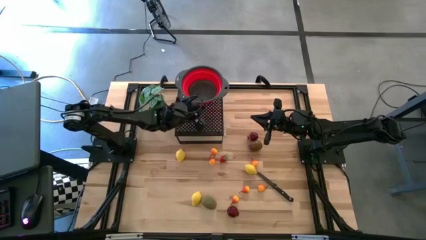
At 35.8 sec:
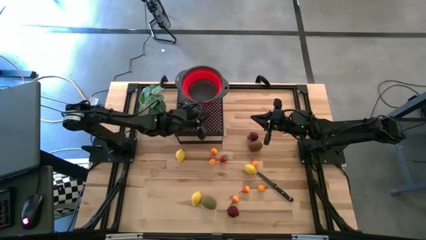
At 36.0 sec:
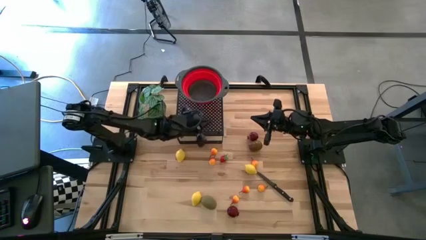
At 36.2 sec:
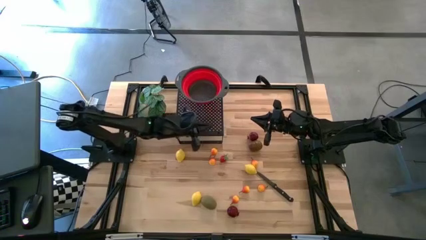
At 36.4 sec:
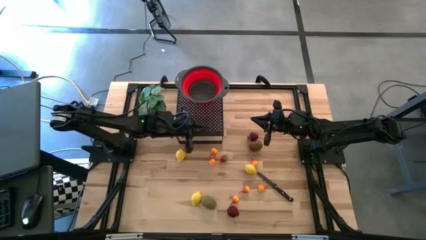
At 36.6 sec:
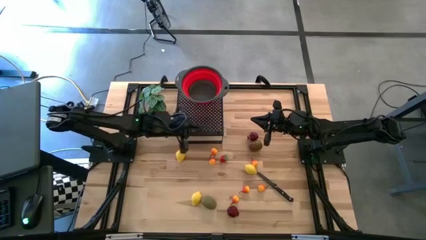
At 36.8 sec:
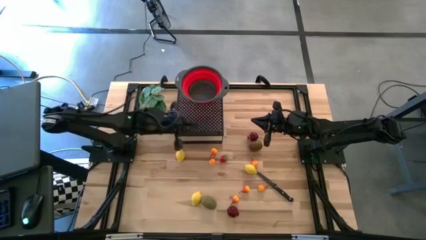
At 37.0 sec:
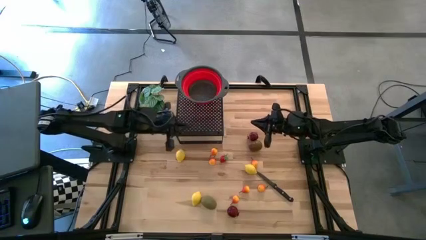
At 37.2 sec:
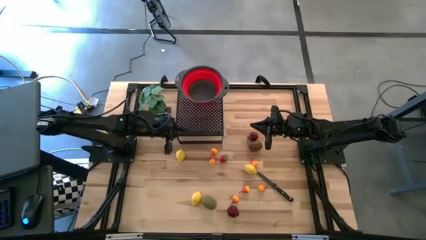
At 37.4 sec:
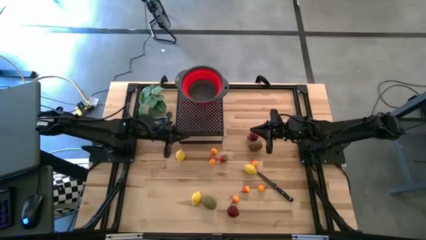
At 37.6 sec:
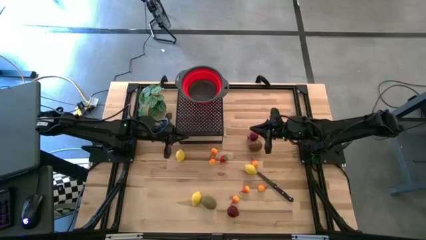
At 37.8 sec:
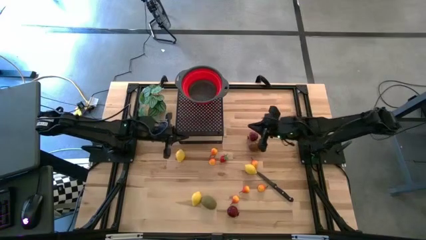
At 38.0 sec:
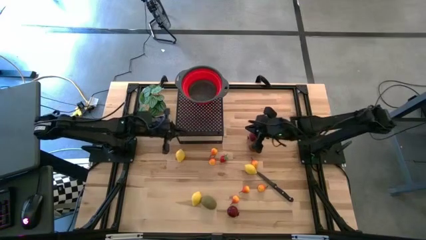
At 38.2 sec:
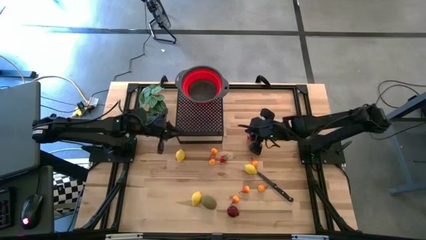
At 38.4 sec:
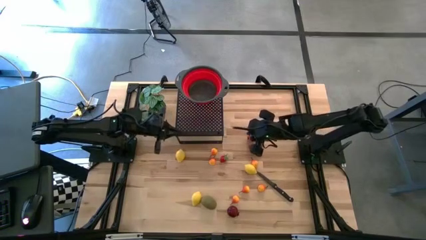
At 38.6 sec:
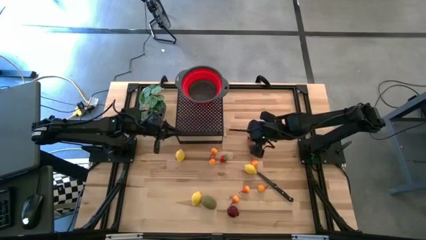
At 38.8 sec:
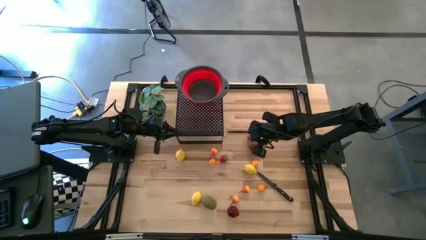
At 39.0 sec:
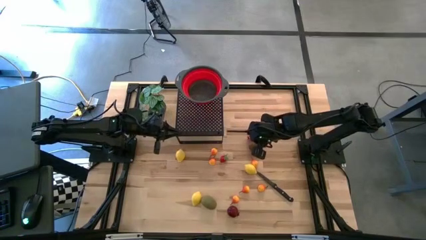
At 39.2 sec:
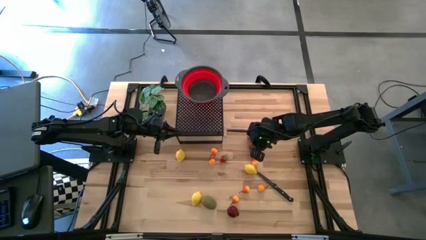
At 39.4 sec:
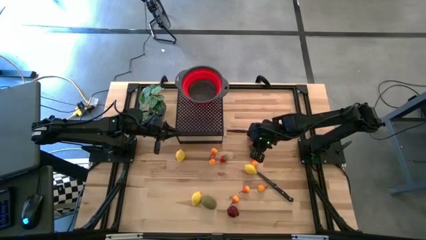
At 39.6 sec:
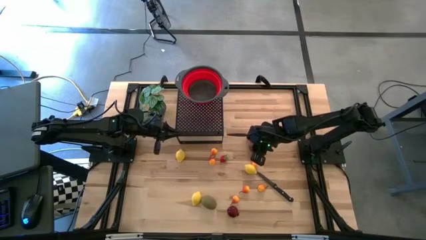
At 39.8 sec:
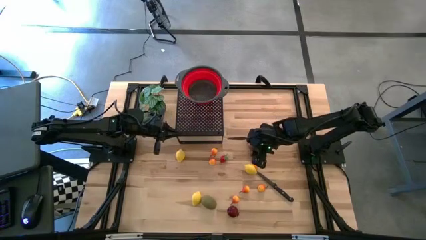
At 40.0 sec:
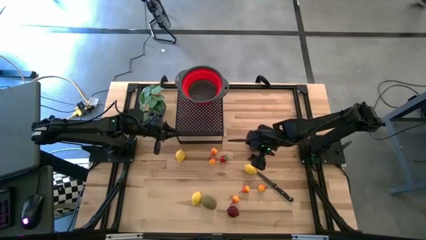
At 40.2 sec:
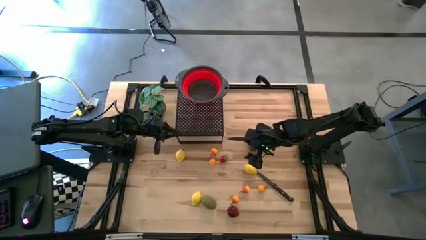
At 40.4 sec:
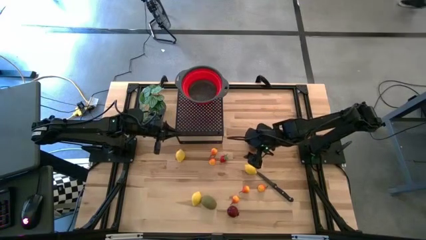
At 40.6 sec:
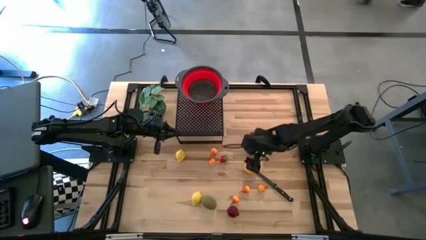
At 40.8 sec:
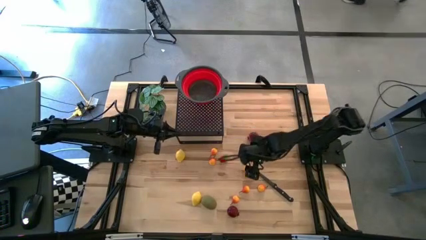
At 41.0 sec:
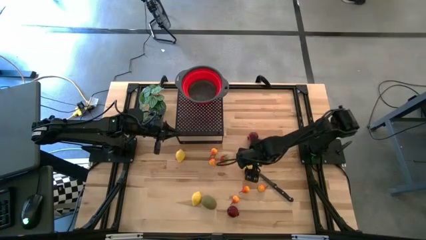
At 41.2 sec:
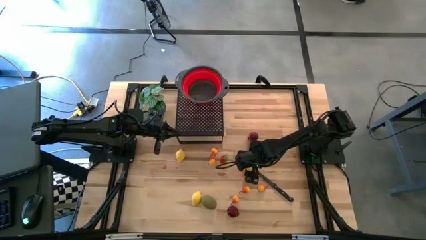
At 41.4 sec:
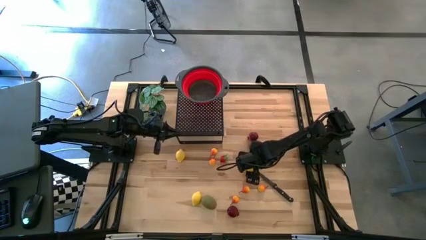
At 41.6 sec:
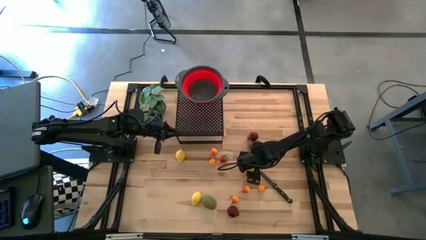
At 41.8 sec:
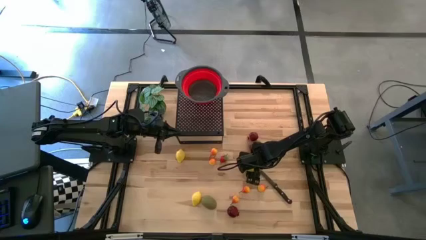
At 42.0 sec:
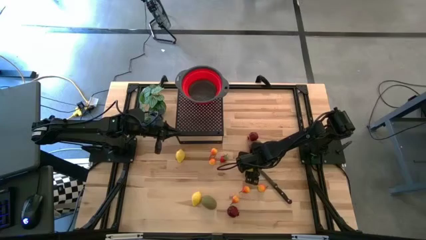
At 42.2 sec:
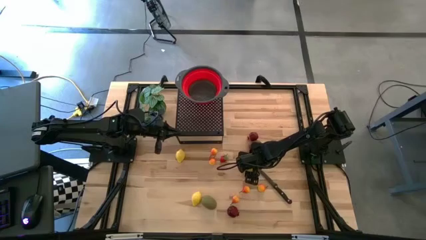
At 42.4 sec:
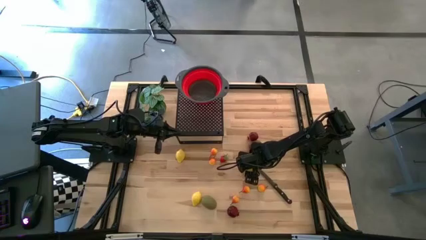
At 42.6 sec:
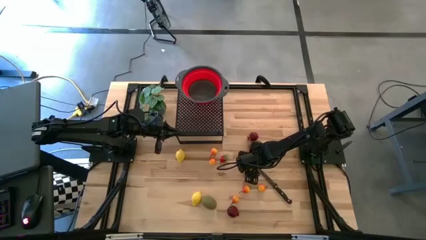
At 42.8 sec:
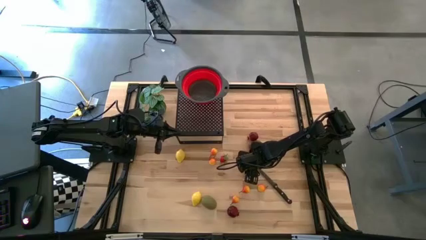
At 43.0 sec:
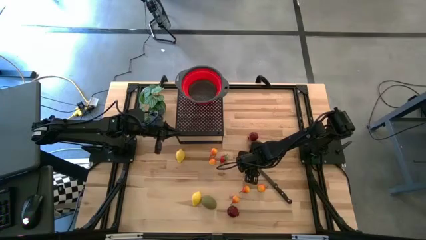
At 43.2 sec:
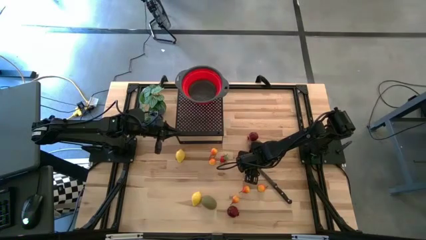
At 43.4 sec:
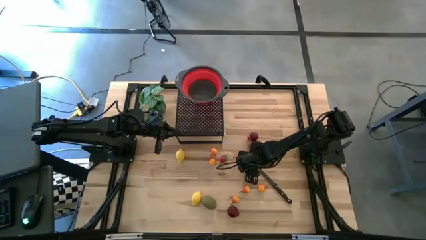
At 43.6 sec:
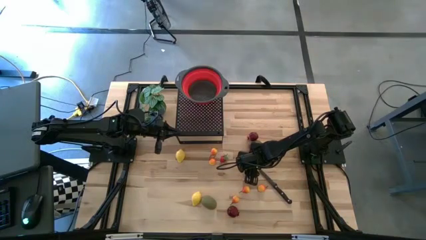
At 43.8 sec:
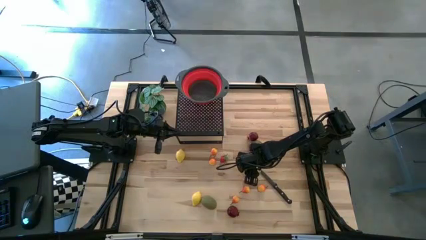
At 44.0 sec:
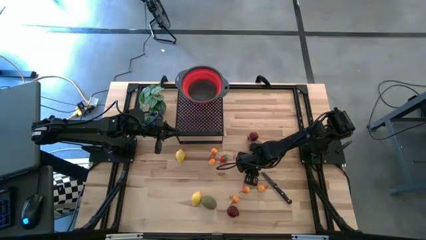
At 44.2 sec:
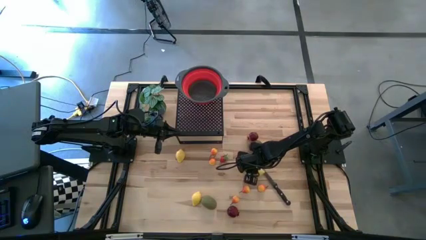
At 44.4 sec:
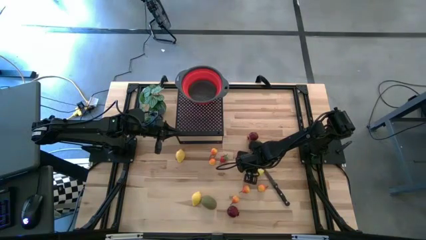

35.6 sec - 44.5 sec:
Task: Pick & Place Fruit
Put the right lemon into the red strainer bowl

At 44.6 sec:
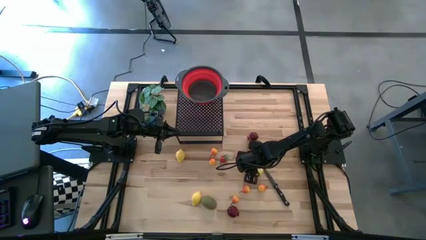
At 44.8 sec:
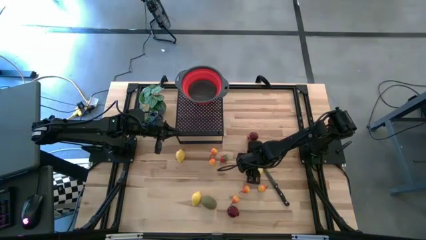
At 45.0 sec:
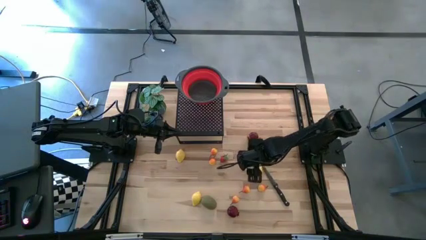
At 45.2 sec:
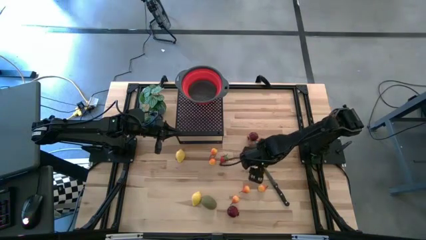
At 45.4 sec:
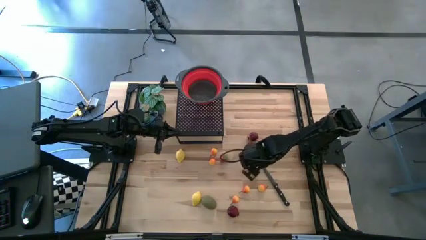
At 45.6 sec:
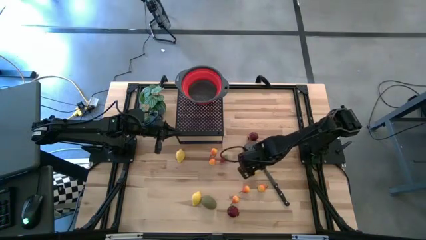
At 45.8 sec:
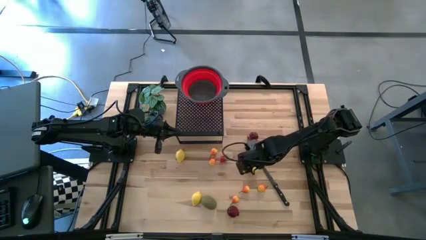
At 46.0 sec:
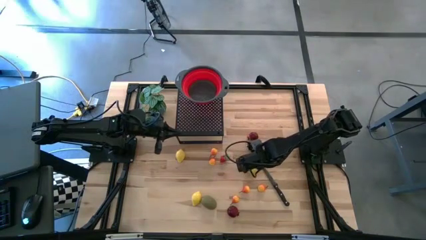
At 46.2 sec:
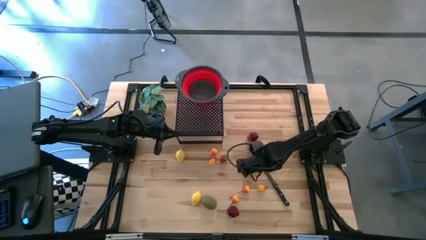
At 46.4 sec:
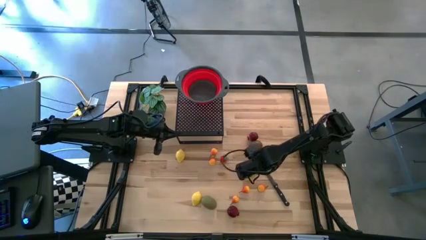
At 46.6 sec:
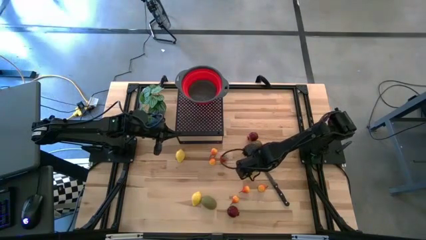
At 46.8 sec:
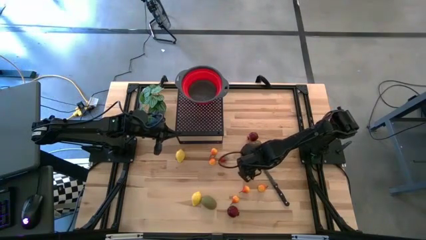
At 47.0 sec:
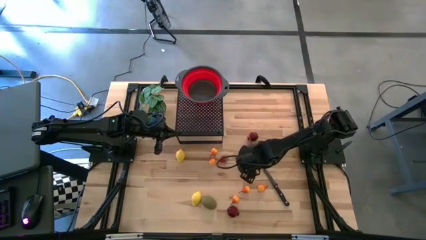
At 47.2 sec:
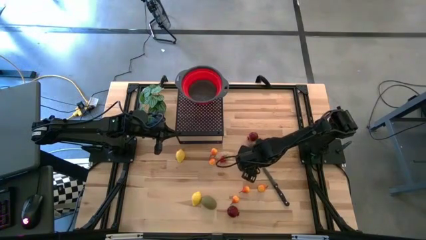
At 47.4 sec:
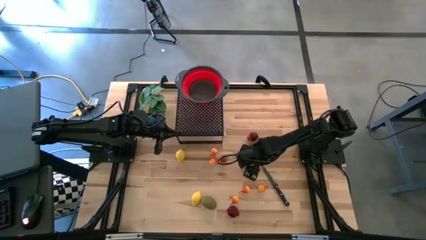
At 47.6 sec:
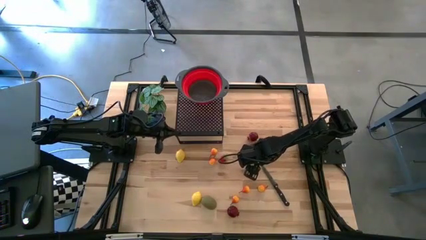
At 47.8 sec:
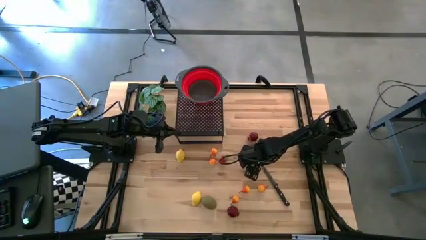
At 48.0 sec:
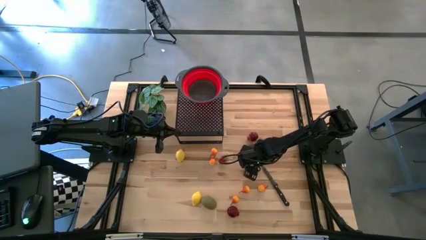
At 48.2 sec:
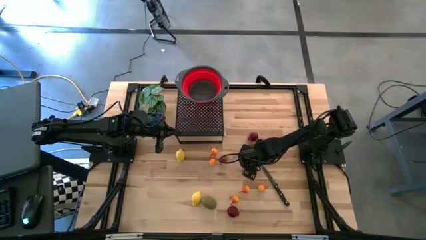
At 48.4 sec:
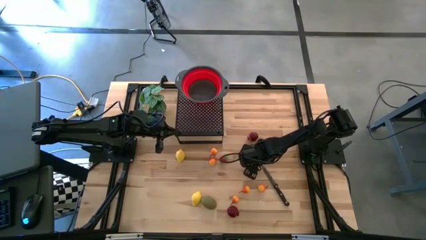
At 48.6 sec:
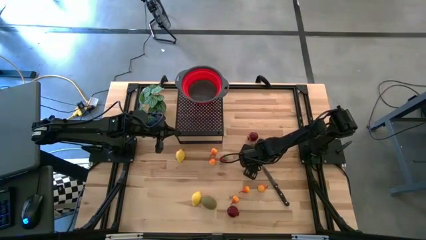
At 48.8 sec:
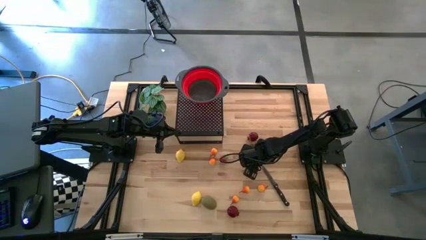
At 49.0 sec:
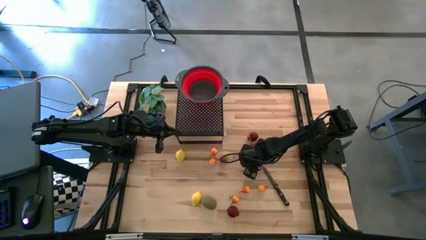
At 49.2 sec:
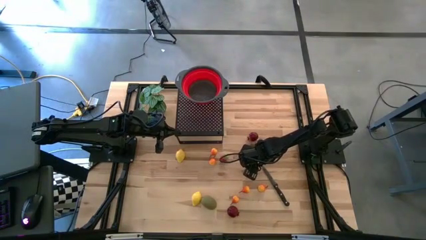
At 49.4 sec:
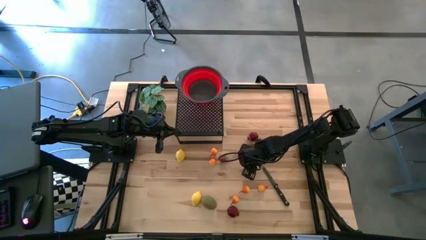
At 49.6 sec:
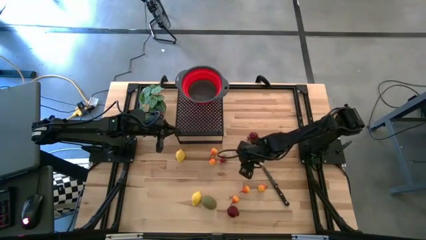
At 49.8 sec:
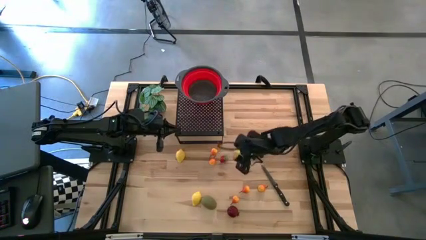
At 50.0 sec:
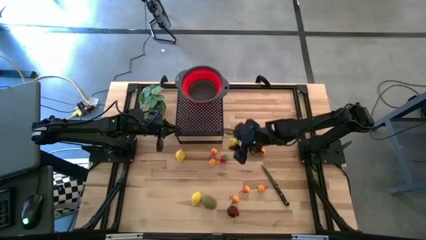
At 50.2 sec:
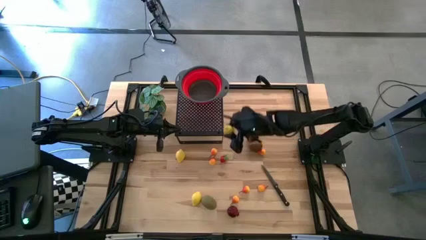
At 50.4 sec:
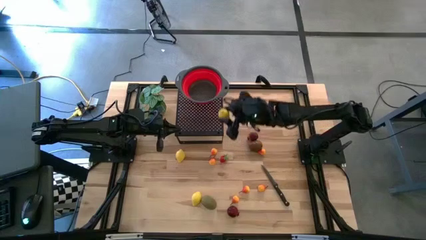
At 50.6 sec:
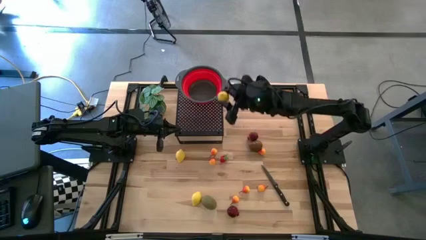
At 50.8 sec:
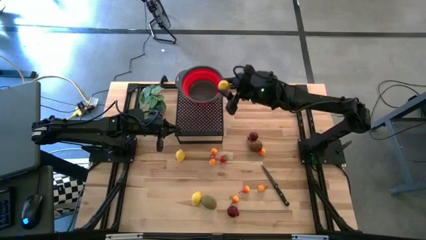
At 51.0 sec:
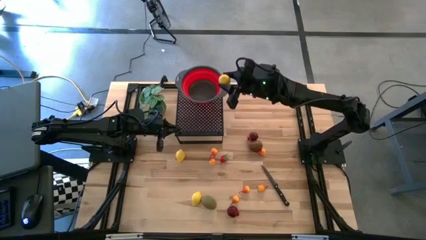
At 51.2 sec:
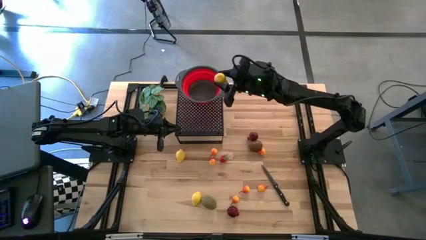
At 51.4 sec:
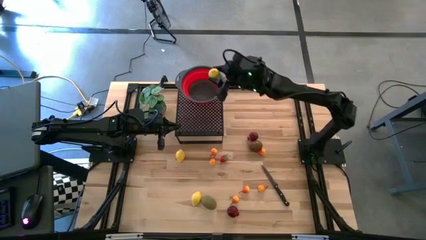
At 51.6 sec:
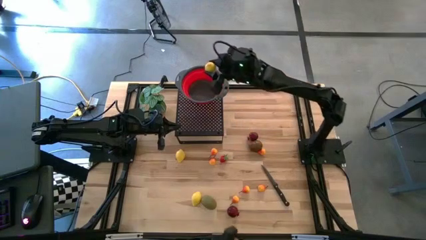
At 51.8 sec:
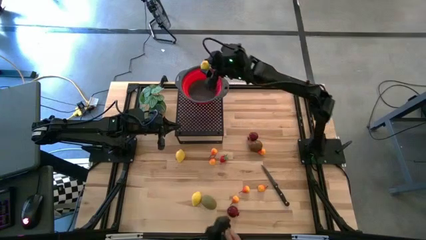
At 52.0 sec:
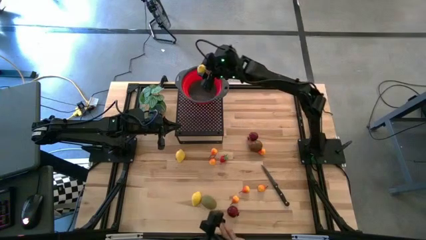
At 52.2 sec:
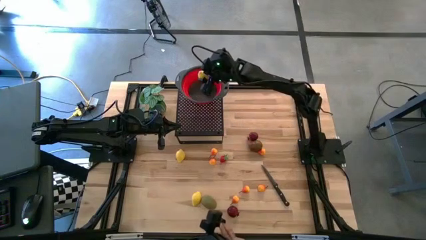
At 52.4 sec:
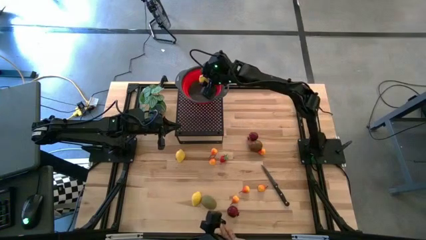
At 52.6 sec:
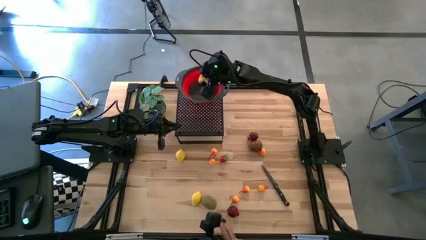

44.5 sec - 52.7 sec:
Put the right lemon into the red strainer bowl
